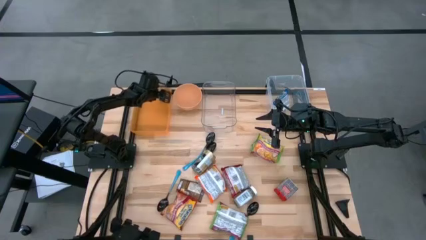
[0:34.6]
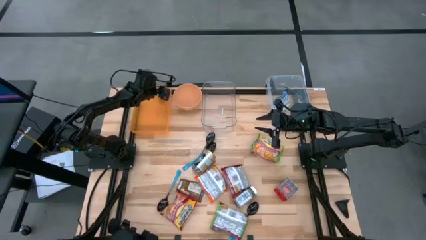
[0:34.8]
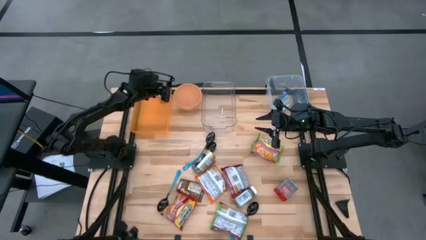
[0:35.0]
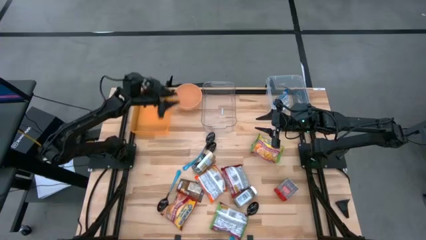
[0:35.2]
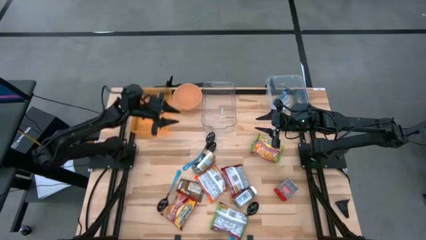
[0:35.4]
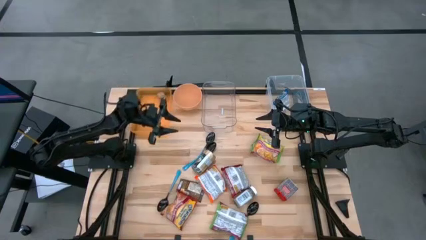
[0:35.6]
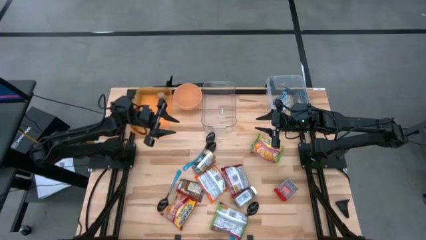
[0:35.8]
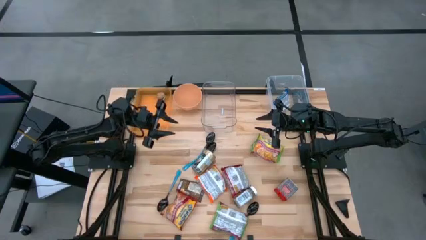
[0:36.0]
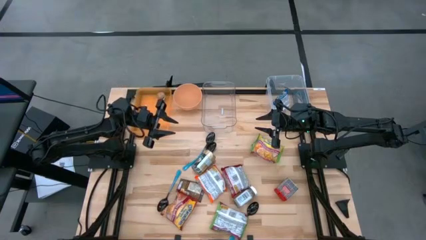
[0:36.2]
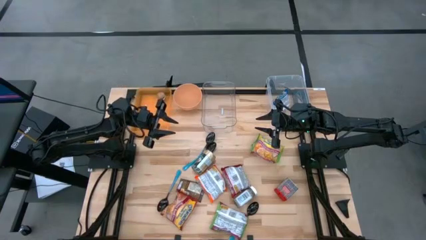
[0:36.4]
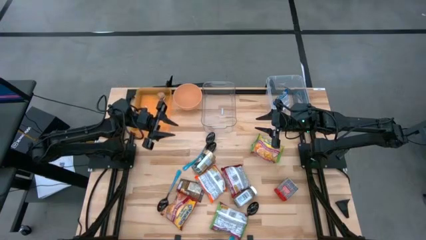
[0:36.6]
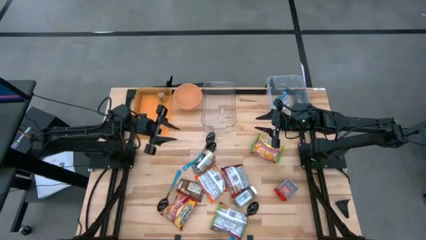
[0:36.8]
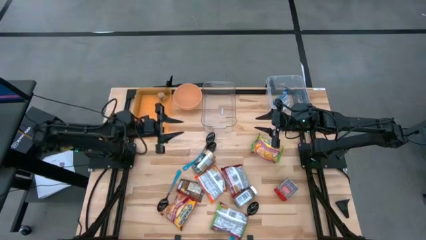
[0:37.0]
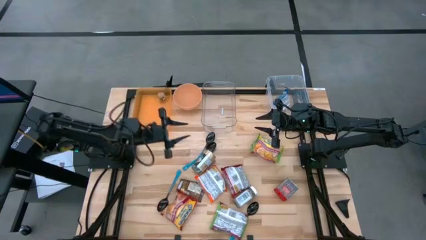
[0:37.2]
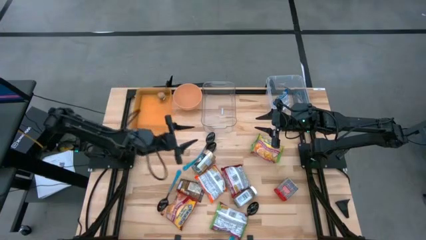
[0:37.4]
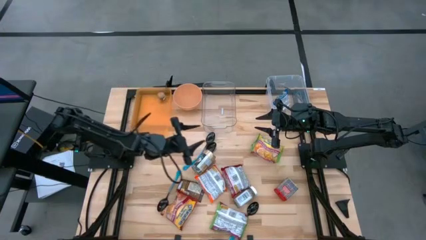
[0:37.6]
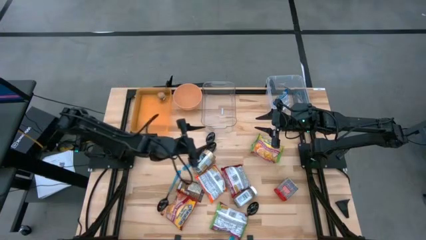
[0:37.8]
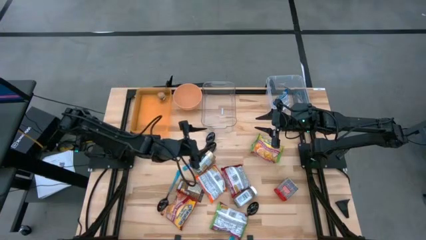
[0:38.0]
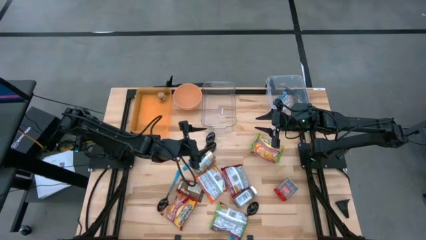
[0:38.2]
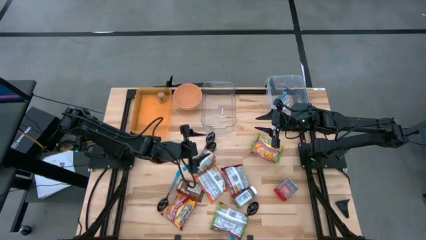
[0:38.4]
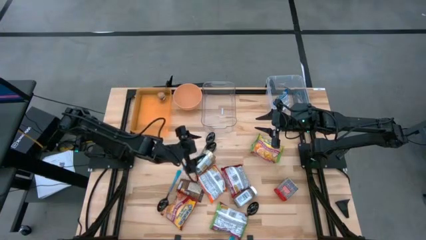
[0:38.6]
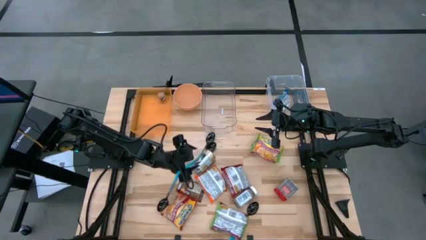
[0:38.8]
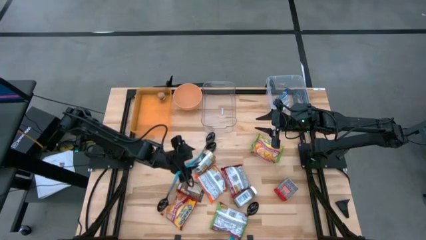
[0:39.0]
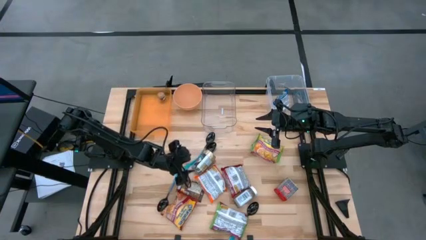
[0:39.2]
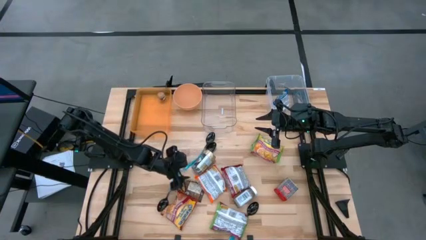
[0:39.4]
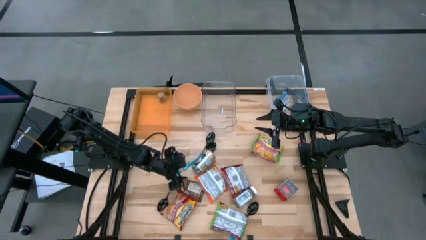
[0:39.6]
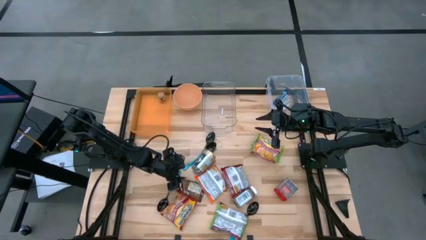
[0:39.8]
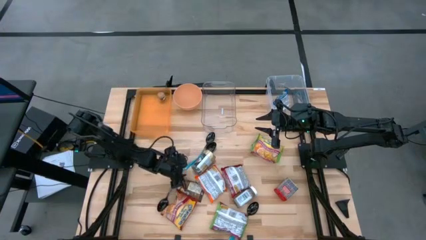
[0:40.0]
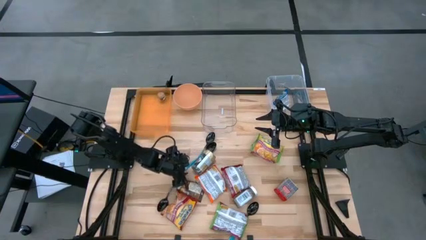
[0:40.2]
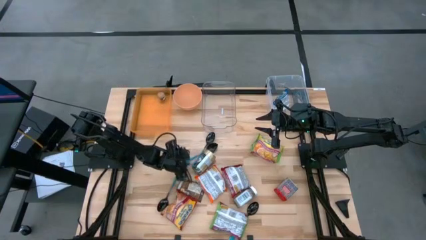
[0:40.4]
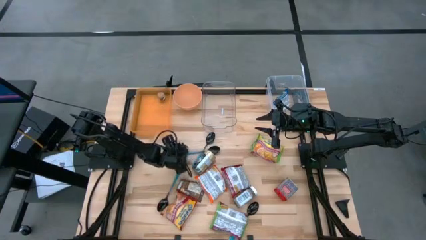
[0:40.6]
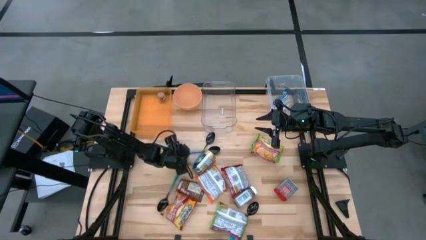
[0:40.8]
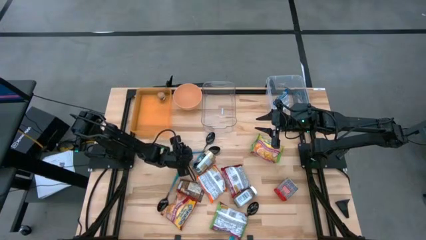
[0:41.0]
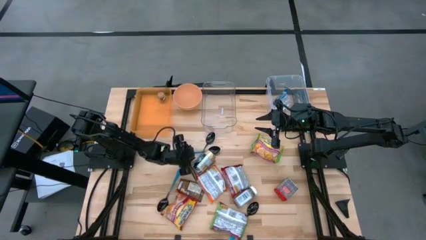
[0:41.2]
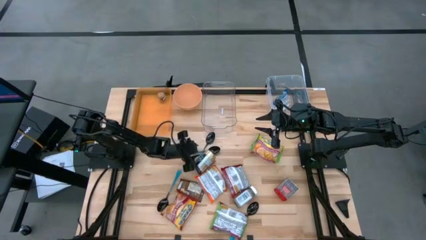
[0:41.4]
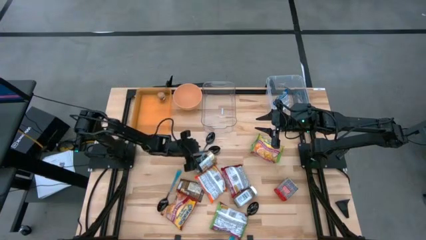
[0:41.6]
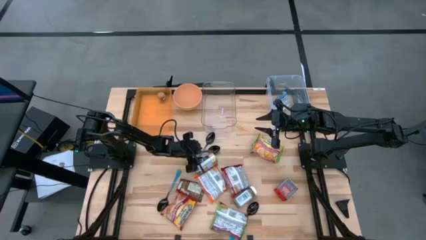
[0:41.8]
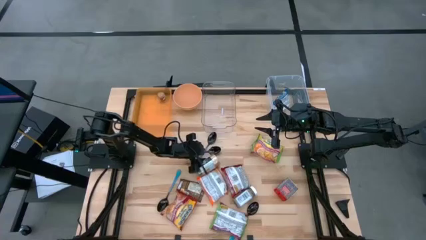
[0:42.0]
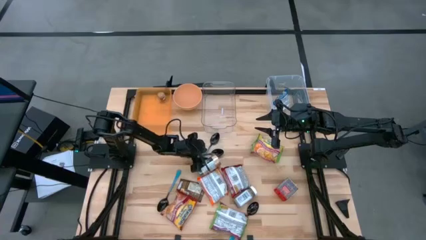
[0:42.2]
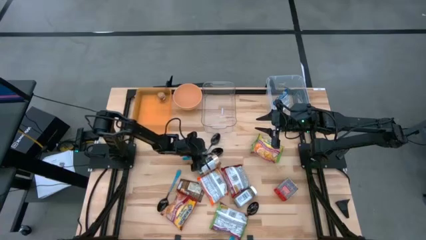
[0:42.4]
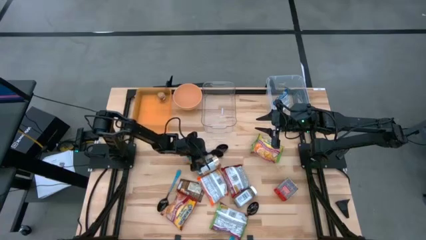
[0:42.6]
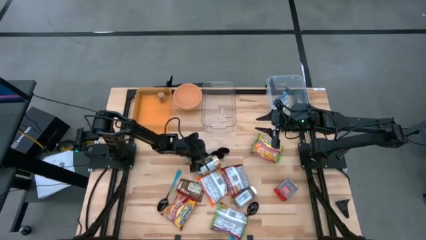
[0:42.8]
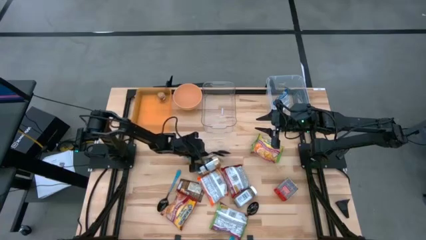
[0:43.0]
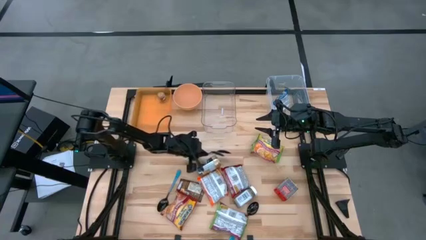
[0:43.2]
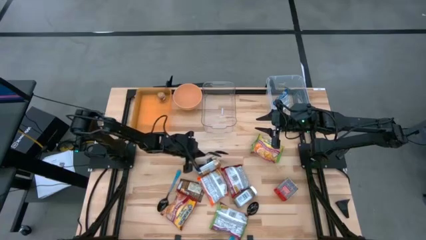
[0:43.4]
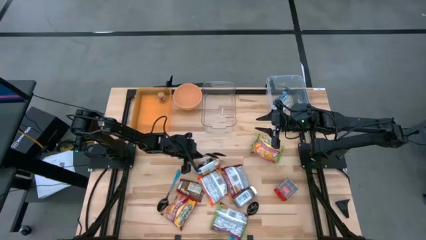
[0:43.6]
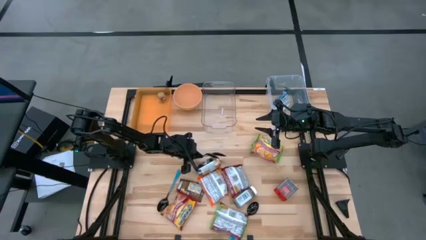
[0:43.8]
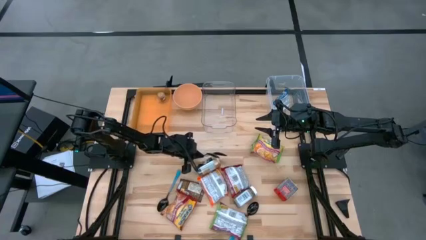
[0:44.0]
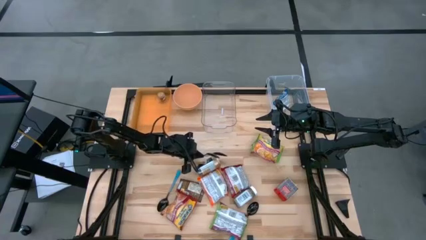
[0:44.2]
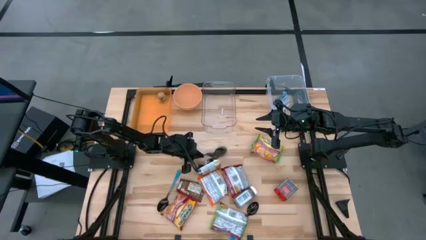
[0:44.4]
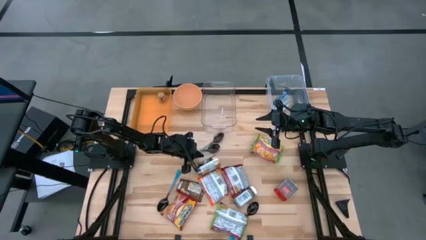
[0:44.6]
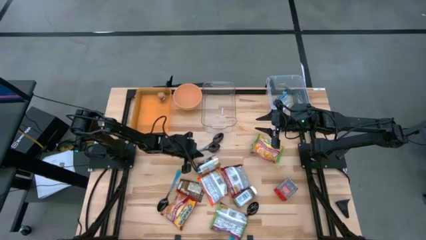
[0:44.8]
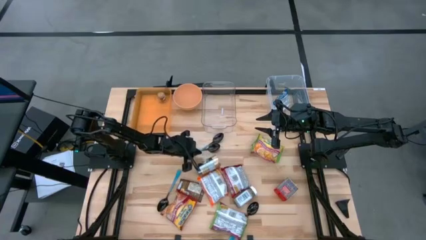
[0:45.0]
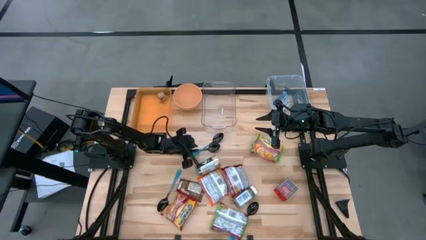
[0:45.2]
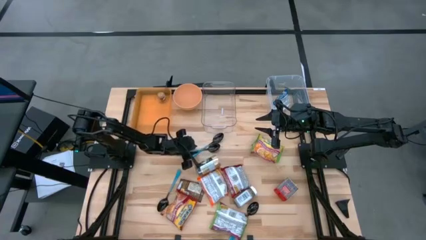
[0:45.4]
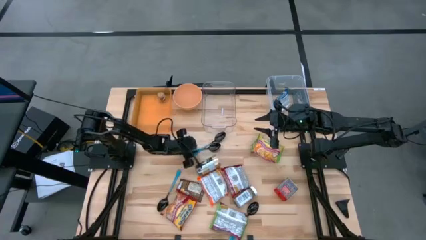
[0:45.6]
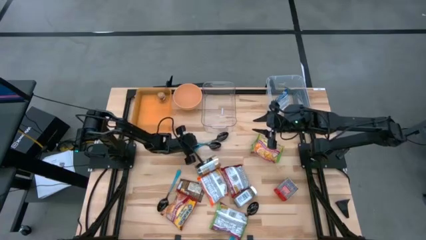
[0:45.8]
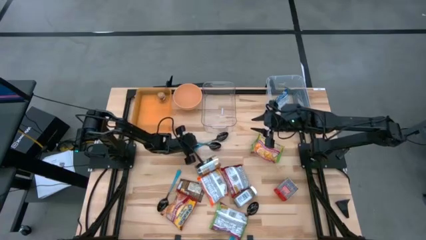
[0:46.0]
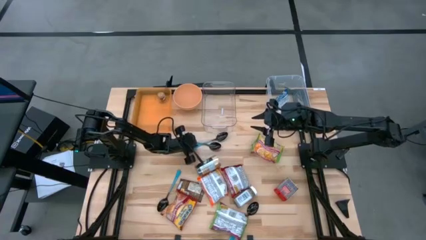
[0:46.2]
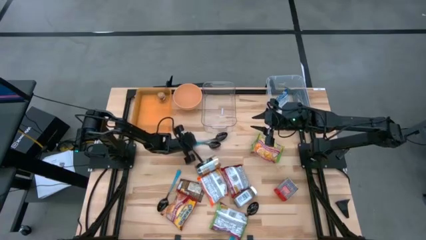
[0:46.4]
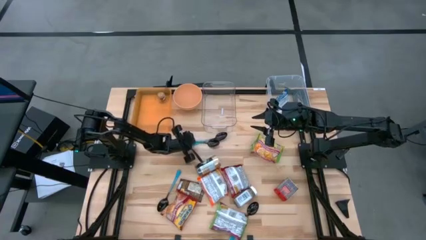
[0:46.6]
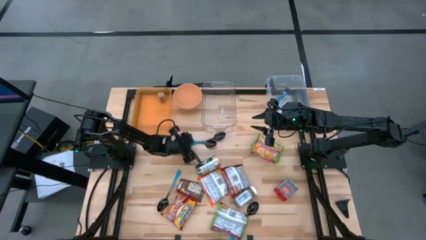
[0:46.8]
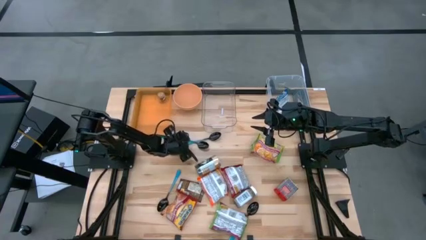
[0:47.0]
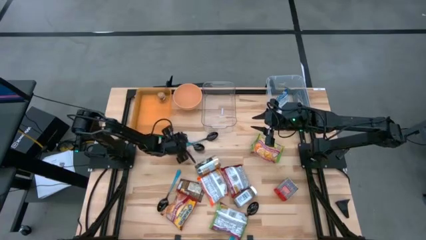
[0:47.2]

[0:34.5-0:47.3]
Task: Pick & Place Food Item
Put the blue spoon into the transparent bin
